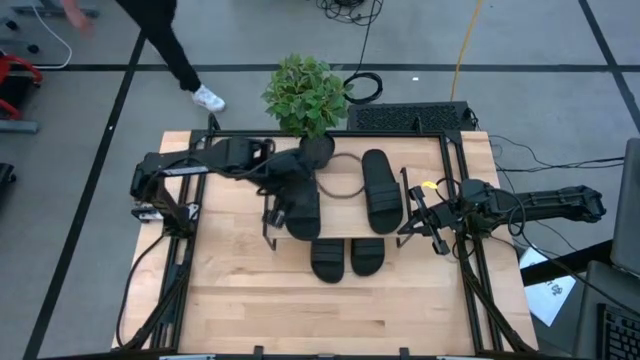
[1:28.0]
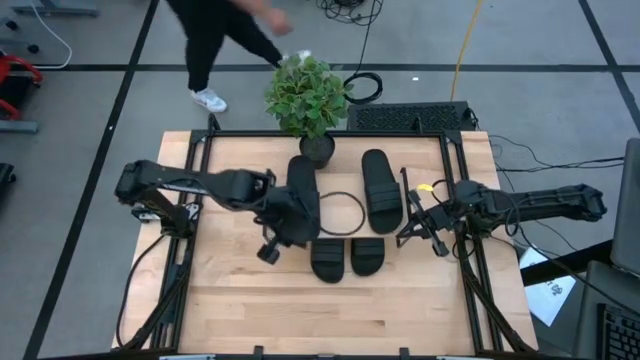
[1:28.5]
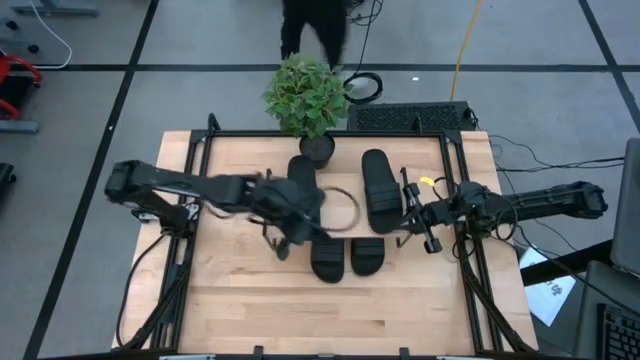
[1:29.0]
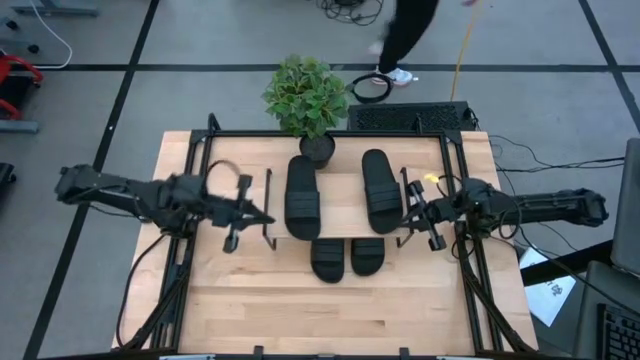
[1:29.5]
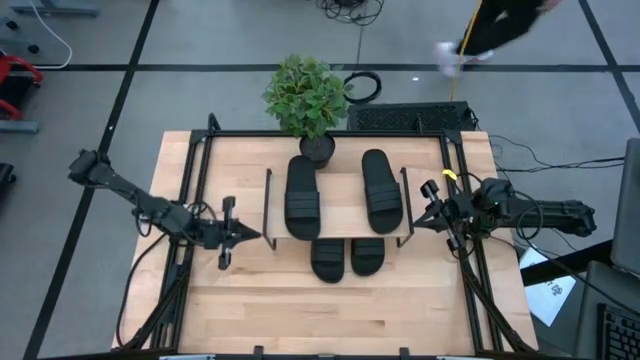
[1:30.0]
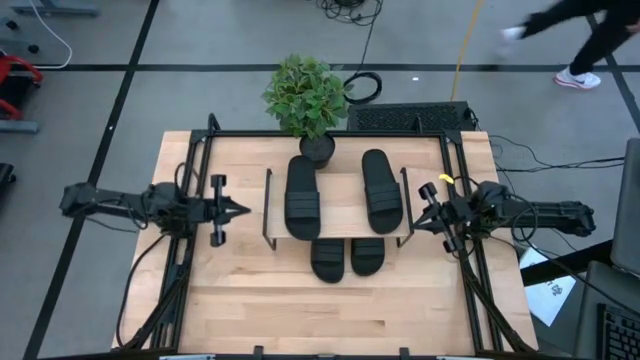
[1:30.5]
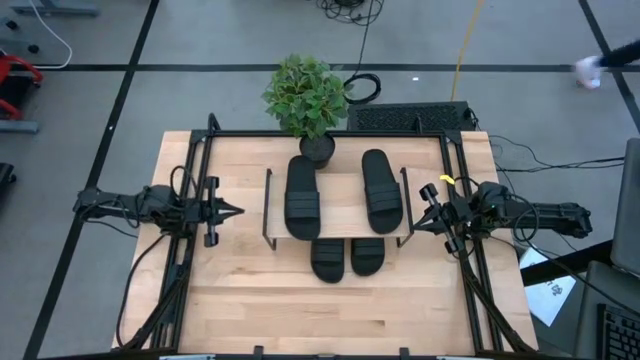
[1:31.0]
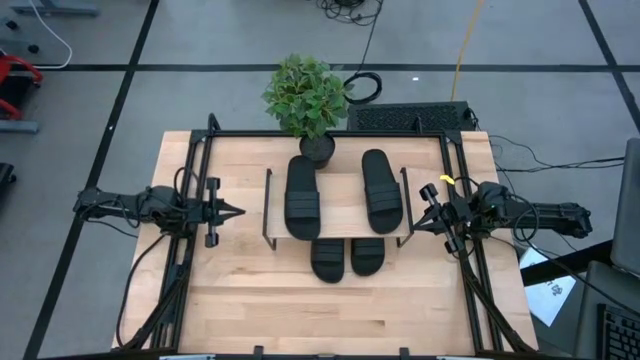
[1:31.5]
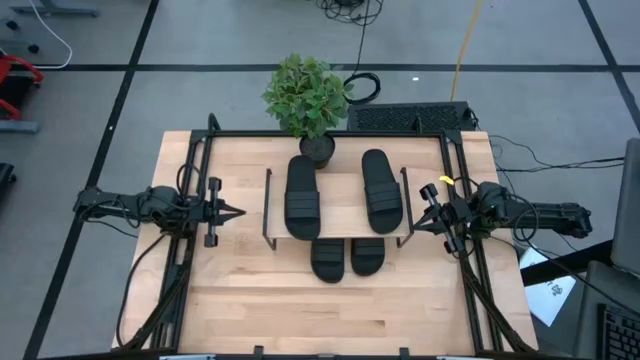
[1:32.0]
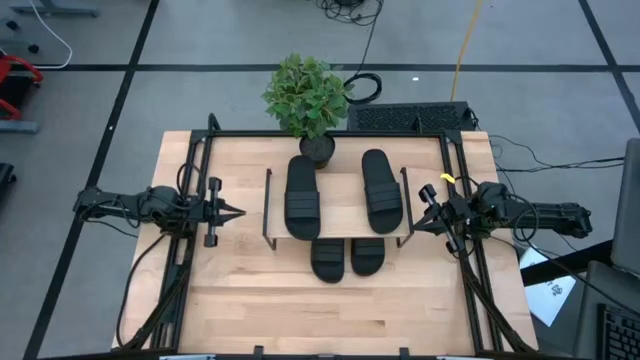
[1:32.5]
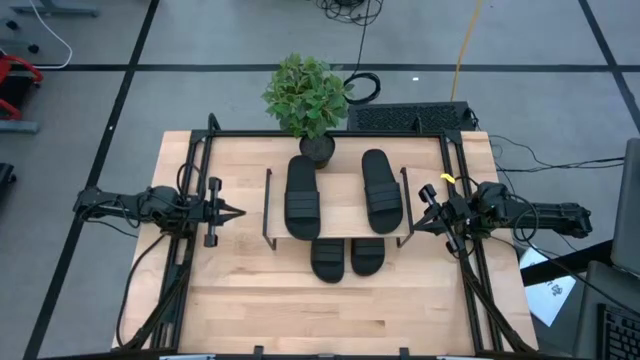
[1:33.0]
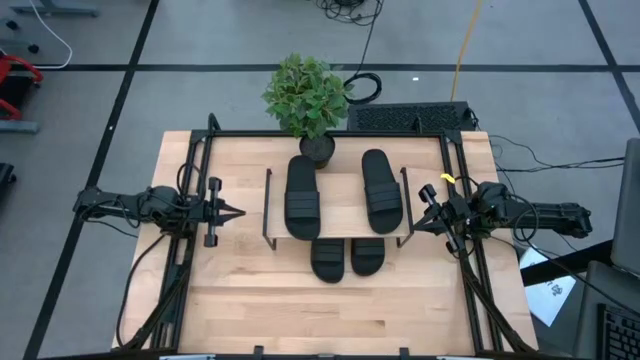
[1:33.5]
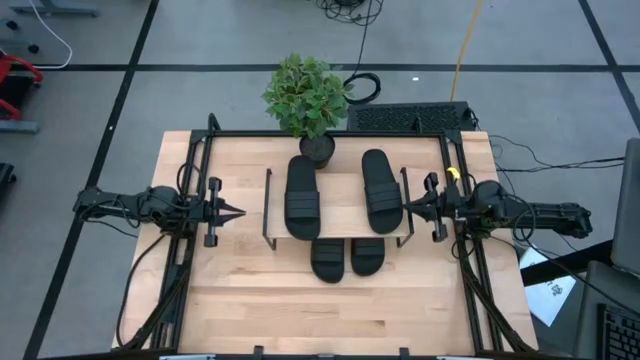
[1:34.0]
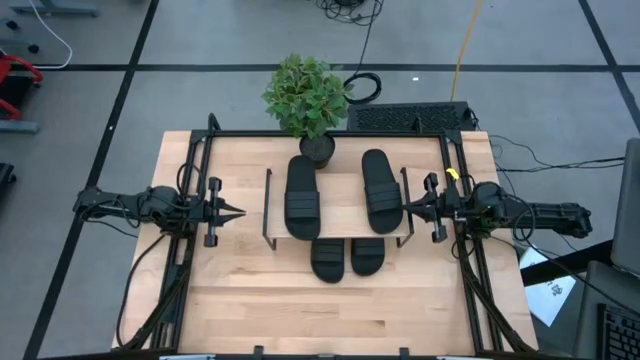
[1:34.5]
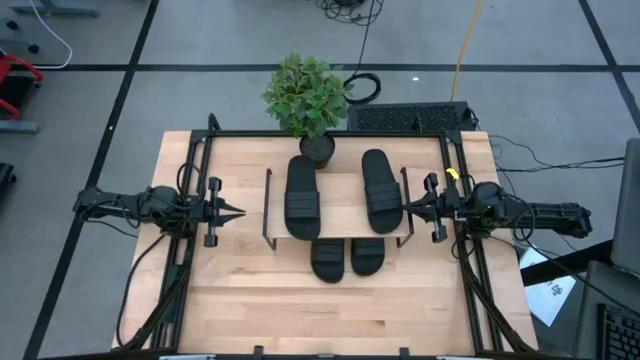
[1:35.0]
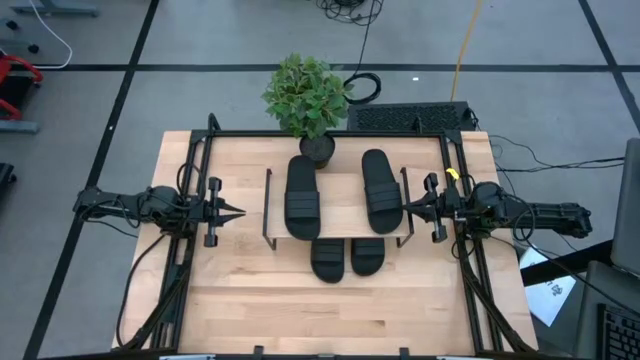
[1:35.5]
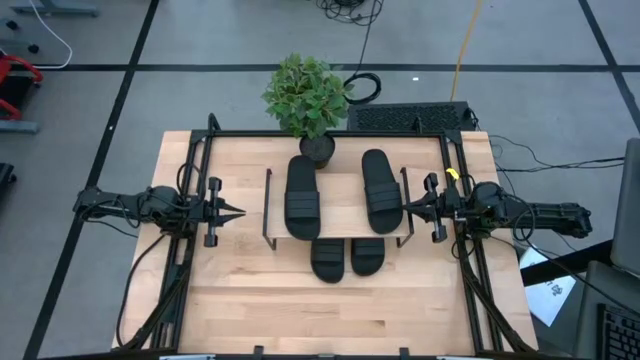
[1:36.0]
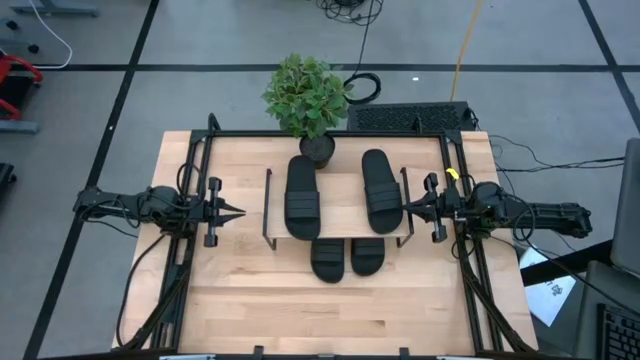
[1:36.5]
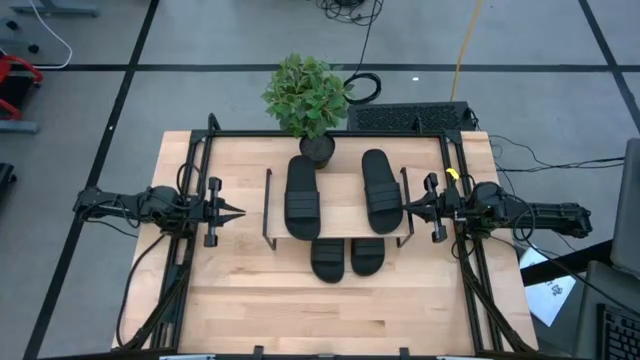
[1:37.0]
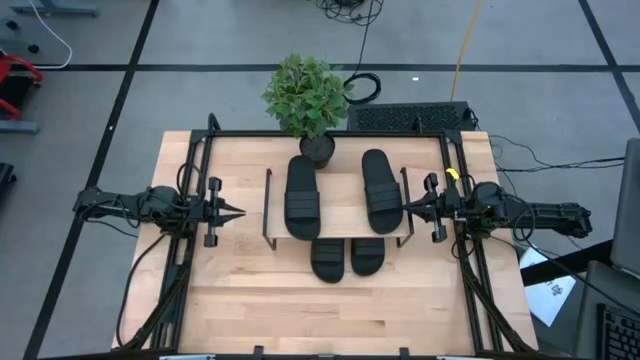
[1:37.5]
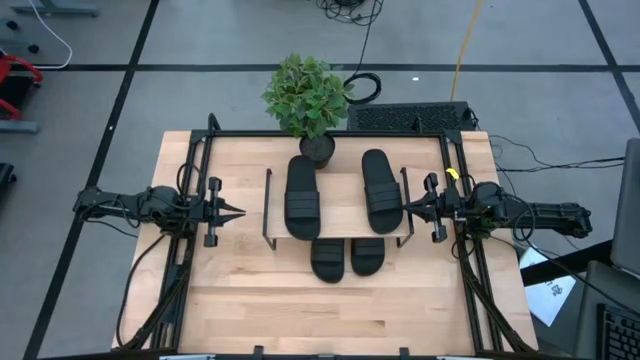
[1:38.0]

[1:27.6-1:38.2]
Task: Pick and place slides into the shelf
Return to Home Position

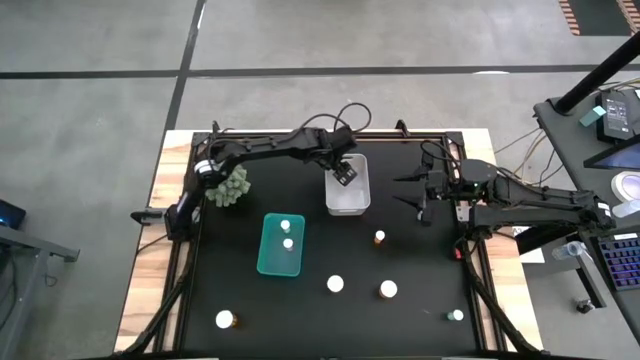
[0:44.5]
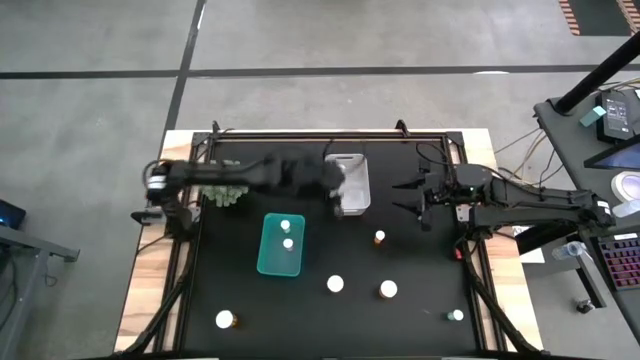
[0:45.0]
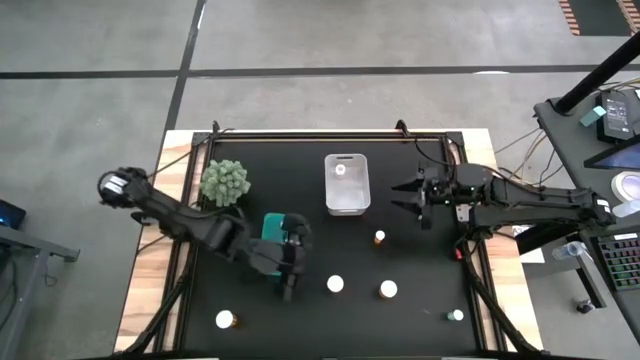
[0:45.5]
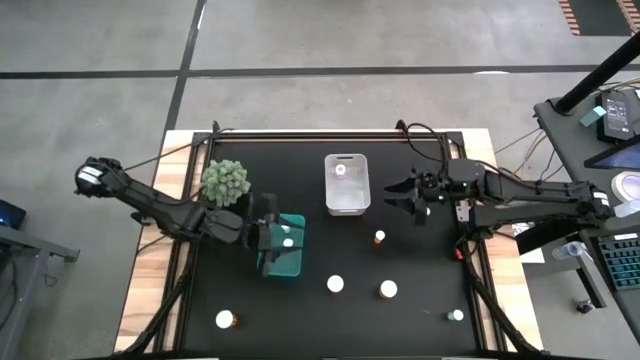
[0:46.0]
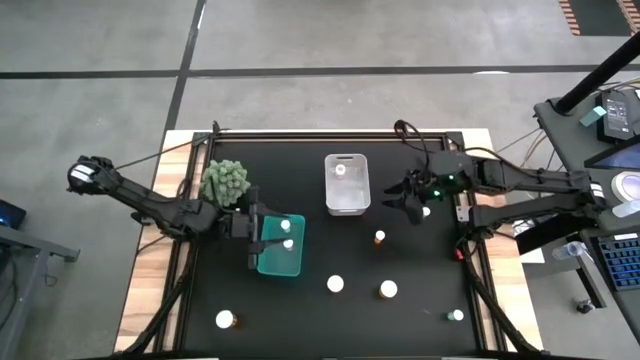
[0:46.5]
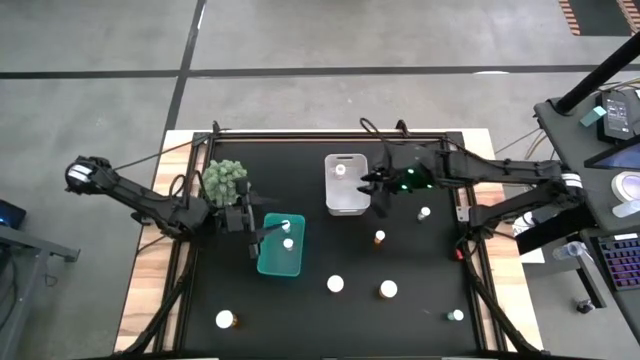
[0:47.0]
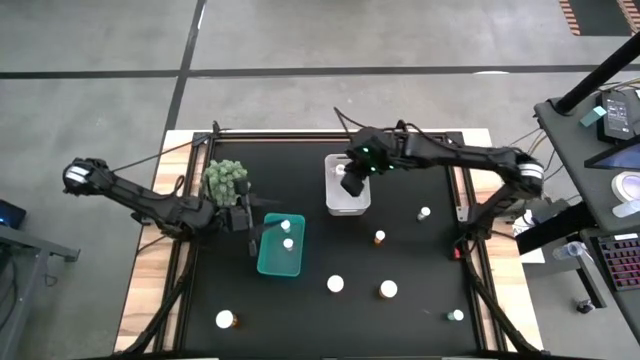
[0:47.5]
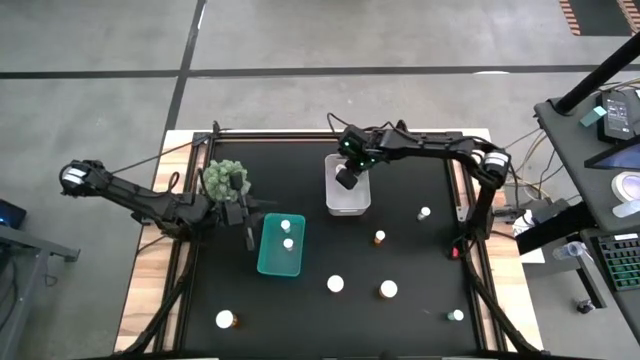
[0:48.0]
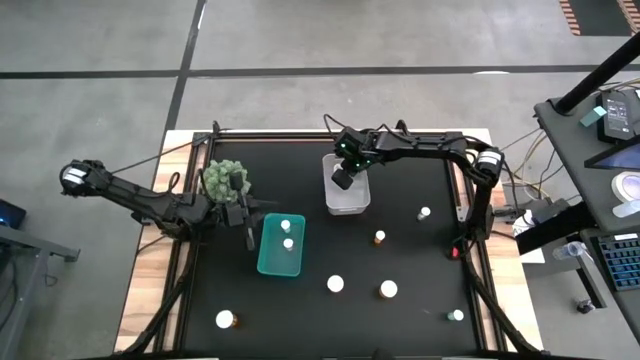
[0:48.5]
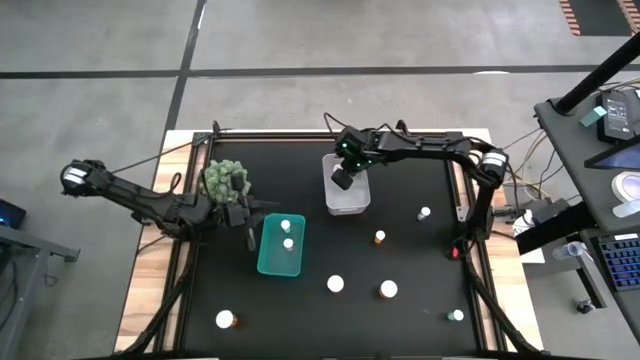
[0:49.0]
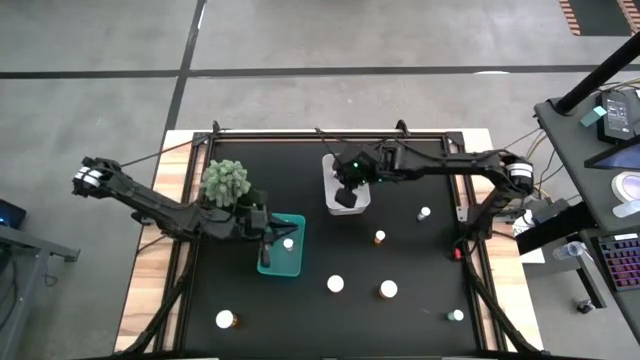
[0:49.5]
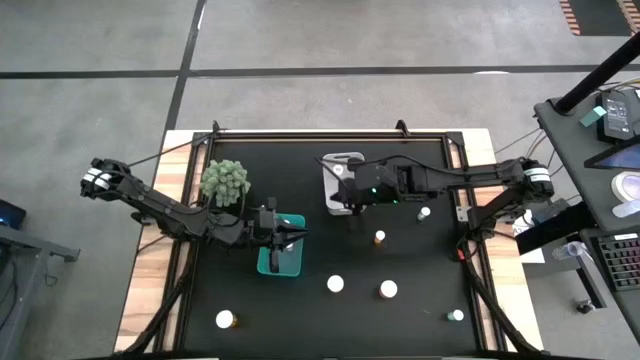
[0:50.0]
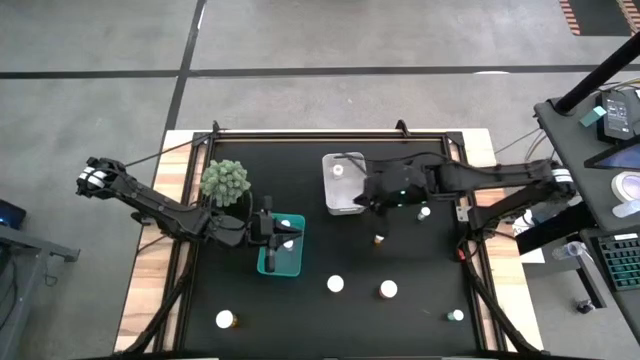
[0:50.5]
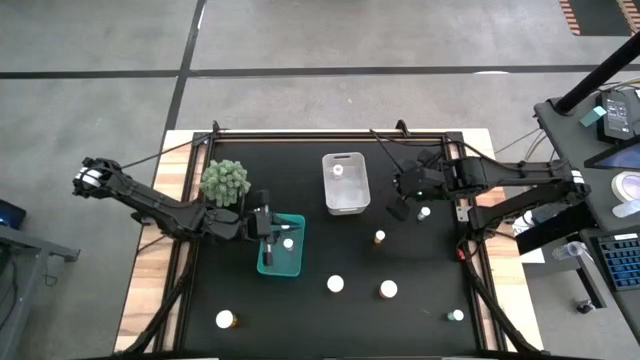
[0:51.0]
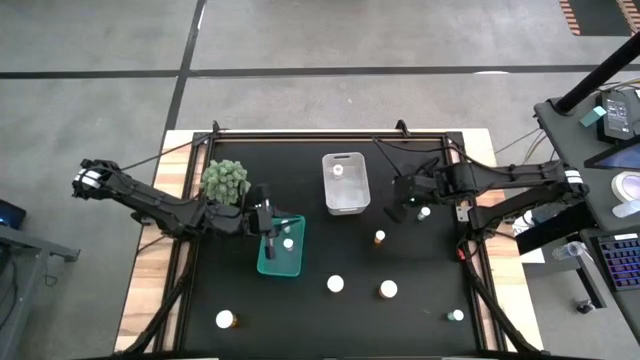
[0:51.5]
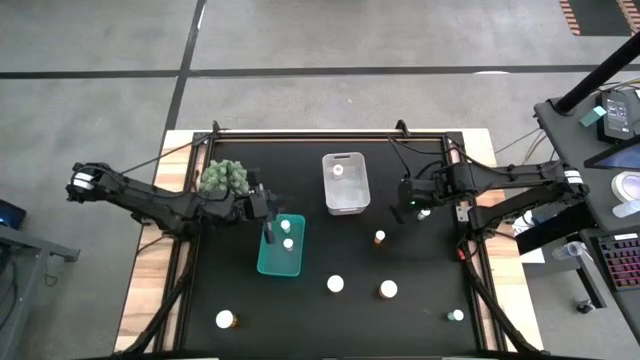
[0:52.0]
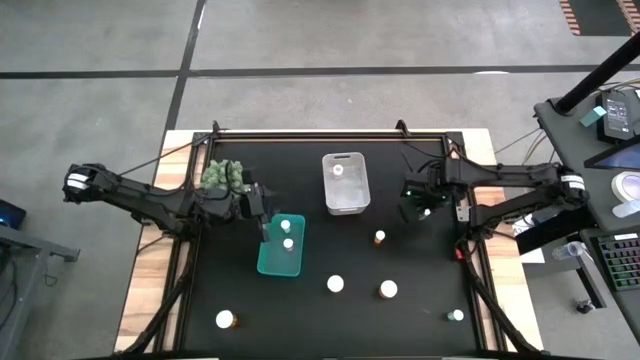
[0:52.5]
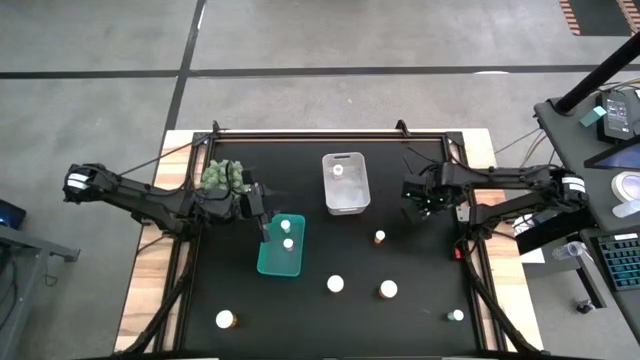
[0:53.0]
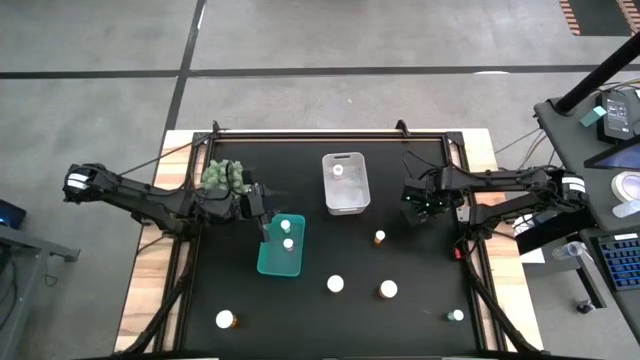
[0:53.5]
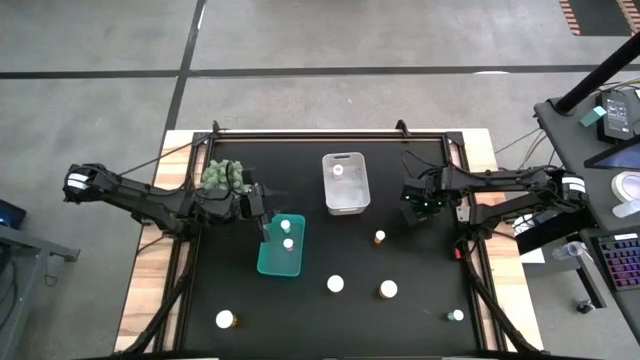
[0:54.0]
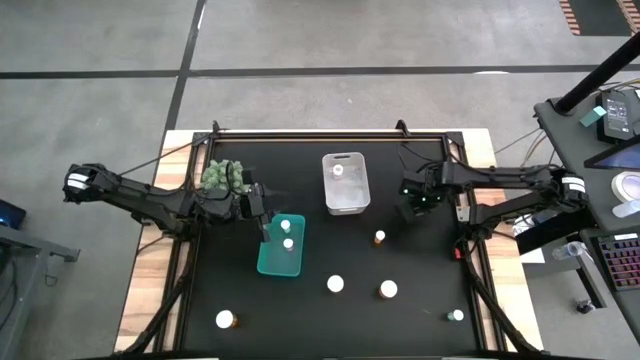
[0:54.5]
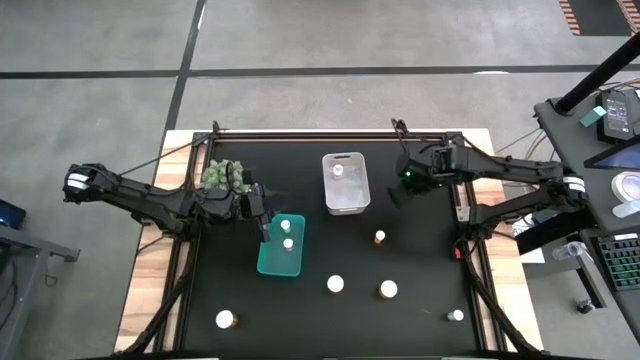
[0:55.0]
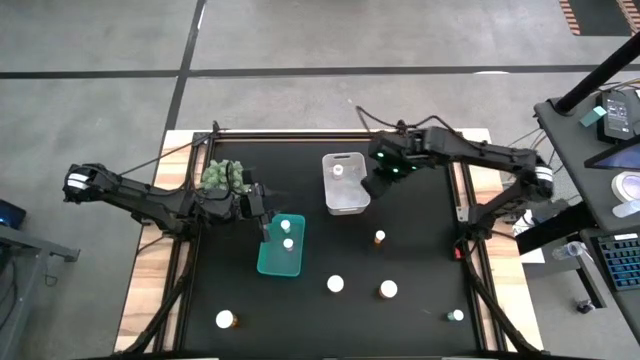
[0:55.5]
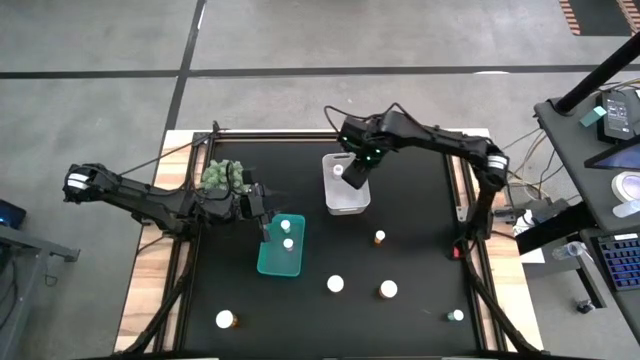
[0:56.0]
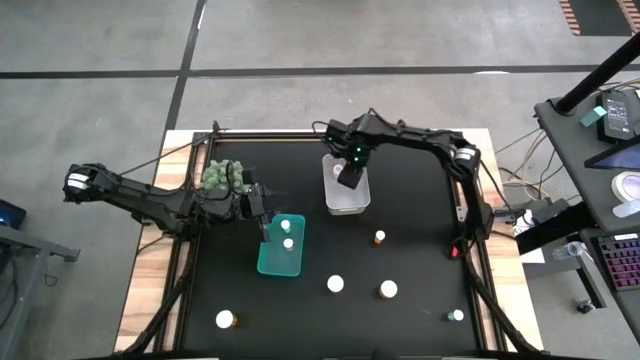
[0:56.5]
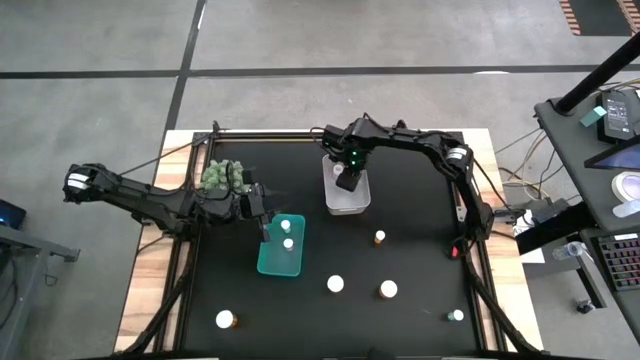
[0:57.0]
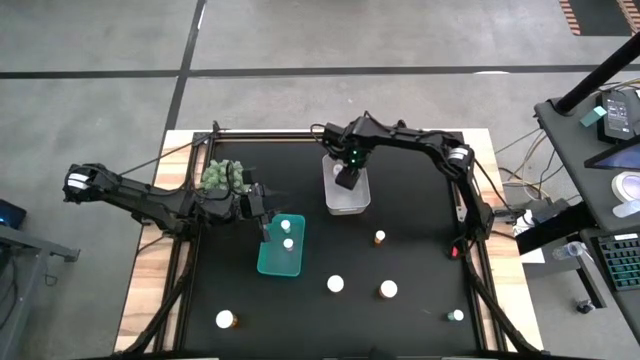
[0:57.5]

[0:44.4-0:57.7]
Task: Pick and place medicine bottles into bin by pill shape (circle, oval)
Put the top right blue pill bottle into the white bin
